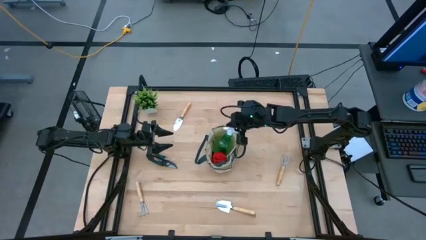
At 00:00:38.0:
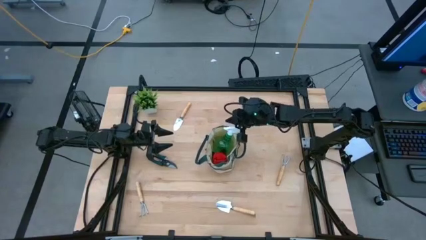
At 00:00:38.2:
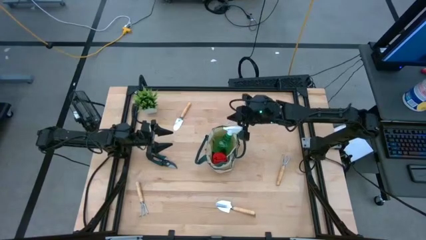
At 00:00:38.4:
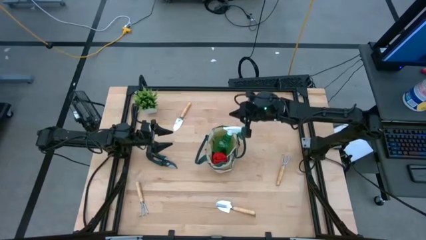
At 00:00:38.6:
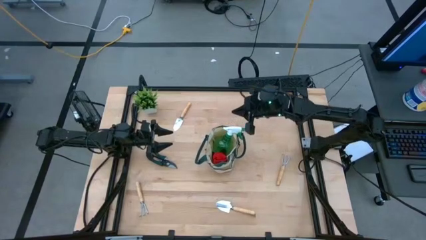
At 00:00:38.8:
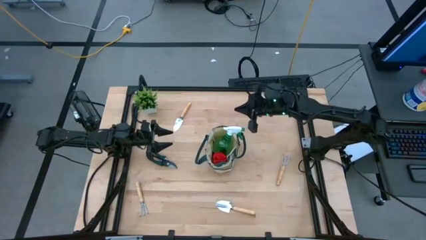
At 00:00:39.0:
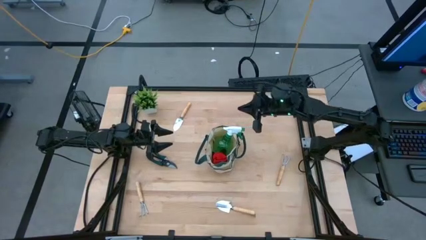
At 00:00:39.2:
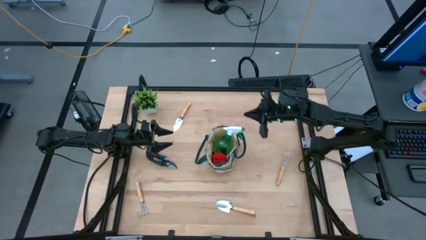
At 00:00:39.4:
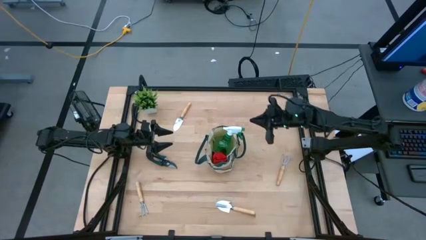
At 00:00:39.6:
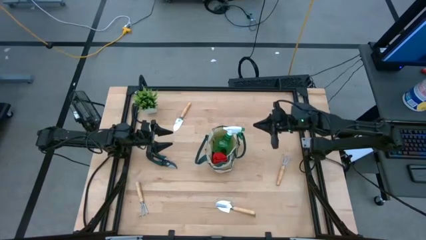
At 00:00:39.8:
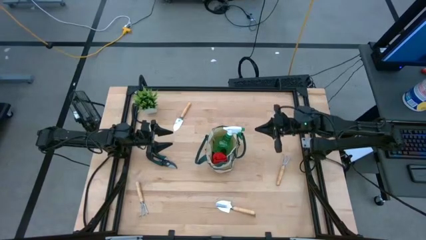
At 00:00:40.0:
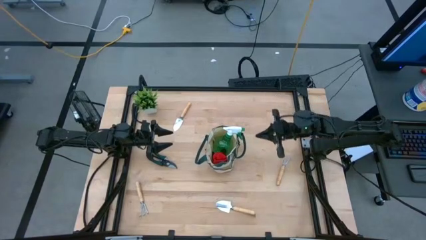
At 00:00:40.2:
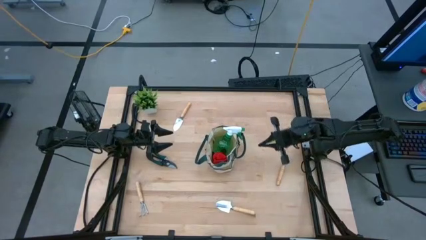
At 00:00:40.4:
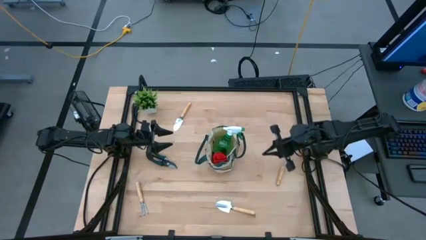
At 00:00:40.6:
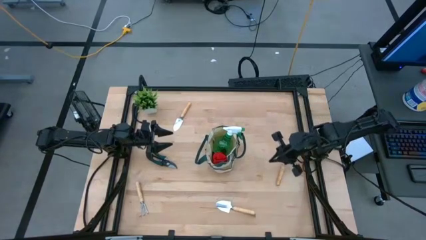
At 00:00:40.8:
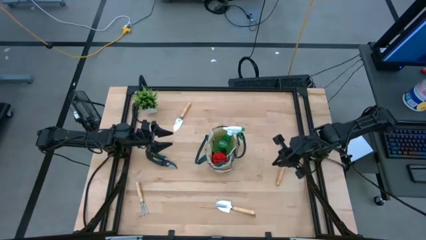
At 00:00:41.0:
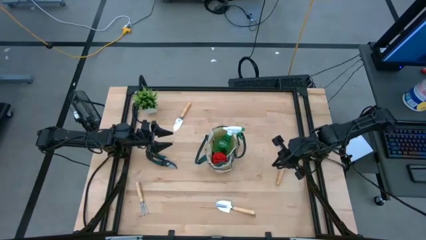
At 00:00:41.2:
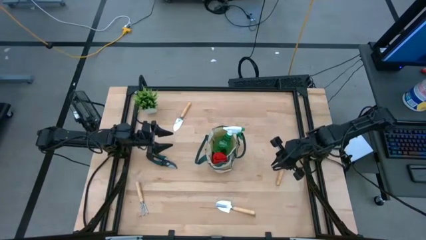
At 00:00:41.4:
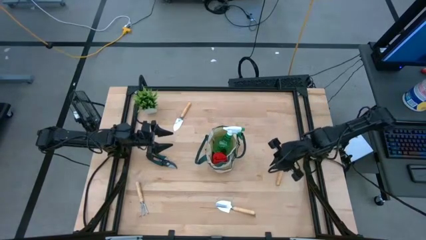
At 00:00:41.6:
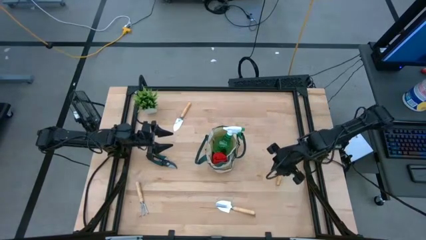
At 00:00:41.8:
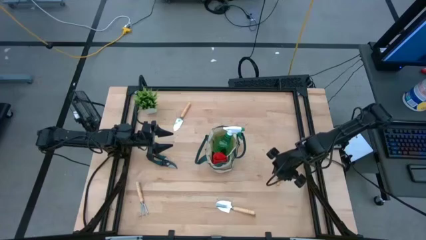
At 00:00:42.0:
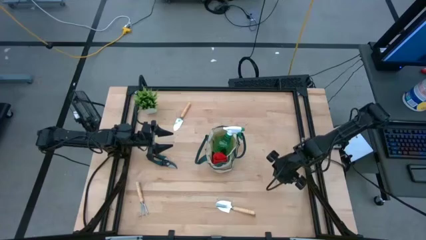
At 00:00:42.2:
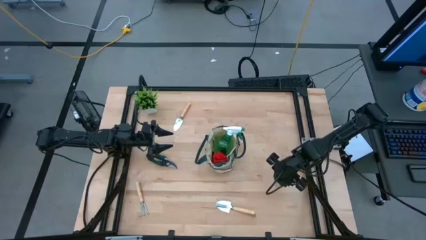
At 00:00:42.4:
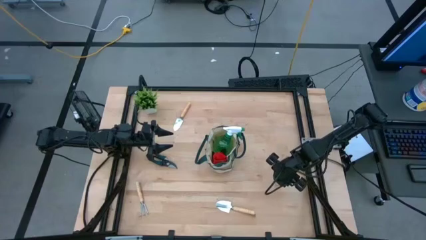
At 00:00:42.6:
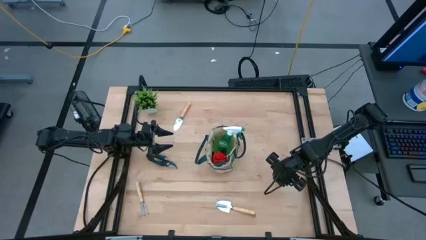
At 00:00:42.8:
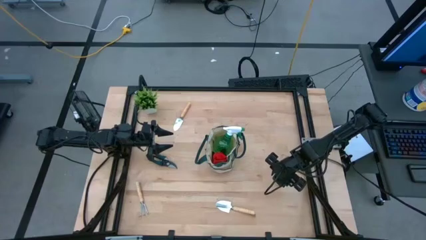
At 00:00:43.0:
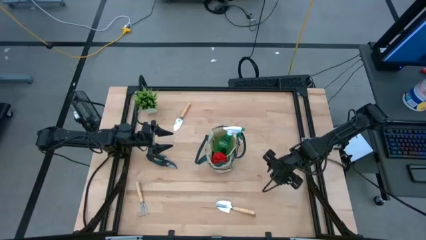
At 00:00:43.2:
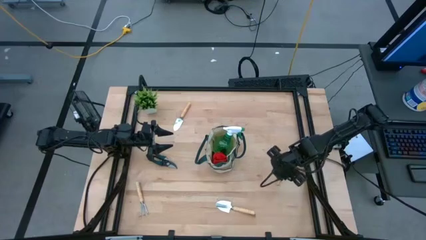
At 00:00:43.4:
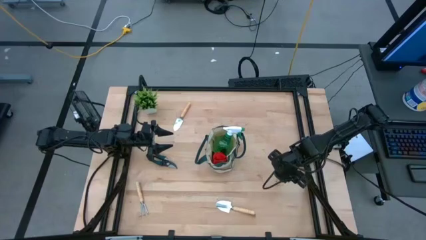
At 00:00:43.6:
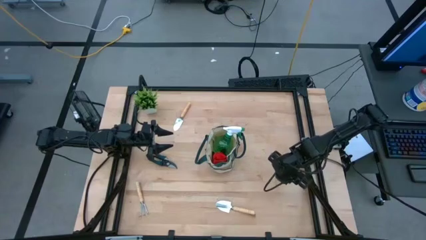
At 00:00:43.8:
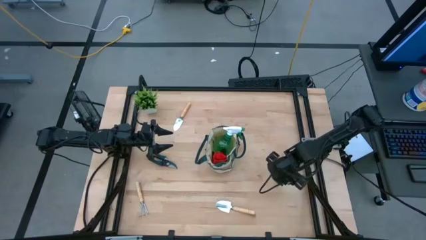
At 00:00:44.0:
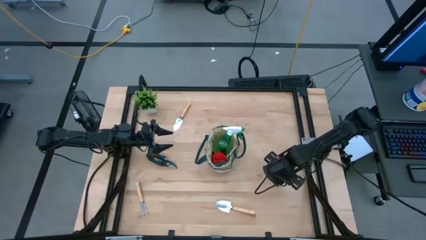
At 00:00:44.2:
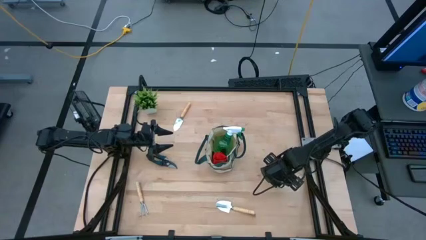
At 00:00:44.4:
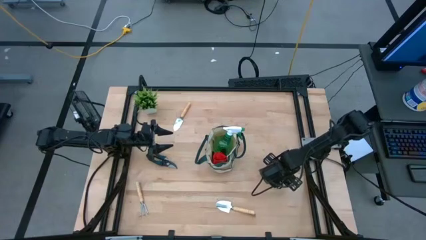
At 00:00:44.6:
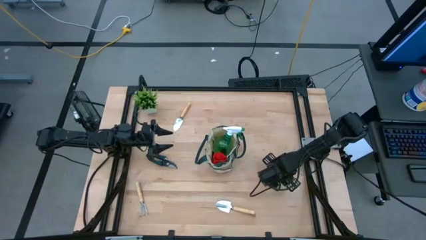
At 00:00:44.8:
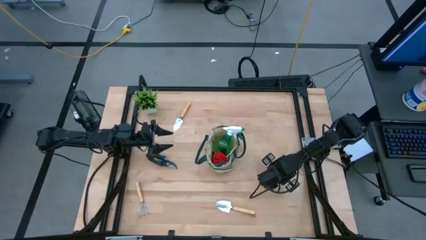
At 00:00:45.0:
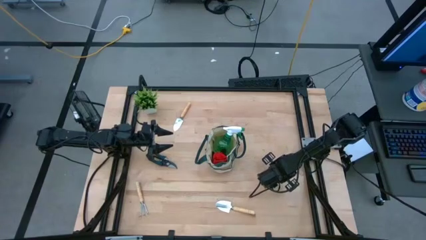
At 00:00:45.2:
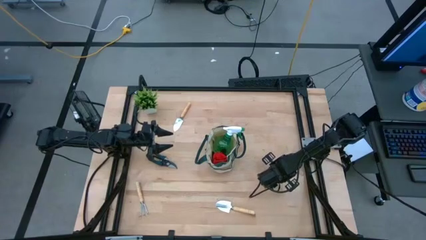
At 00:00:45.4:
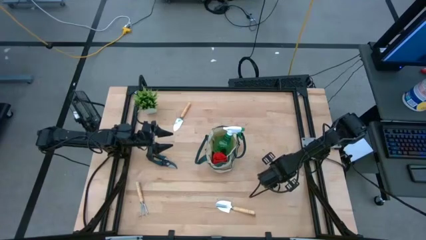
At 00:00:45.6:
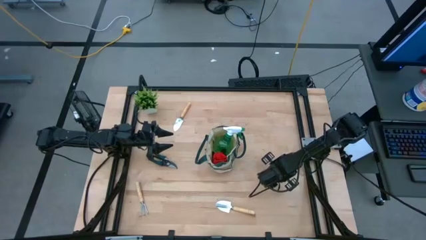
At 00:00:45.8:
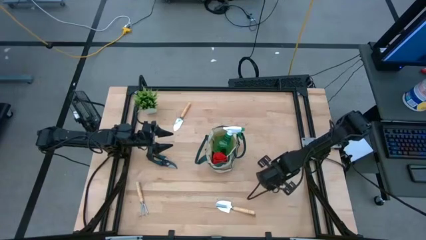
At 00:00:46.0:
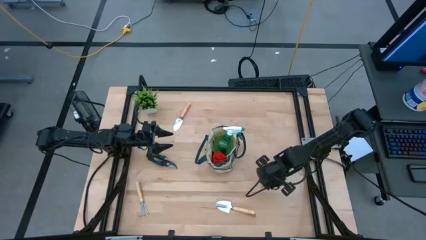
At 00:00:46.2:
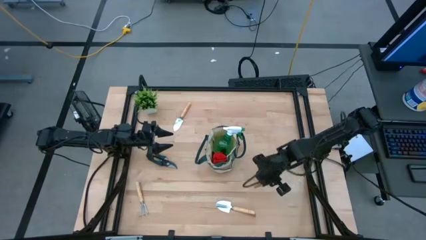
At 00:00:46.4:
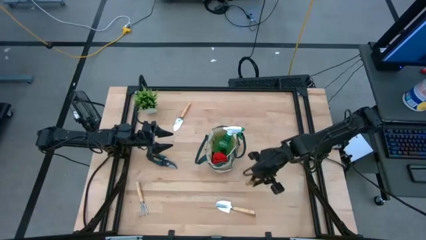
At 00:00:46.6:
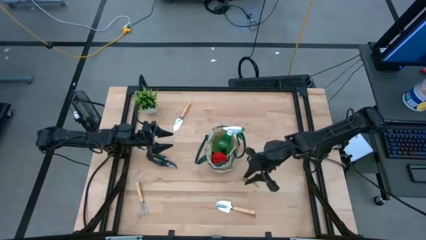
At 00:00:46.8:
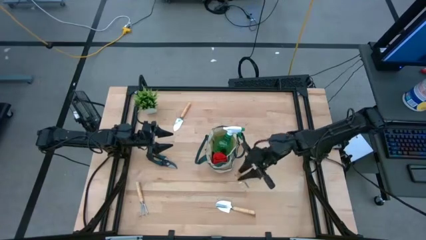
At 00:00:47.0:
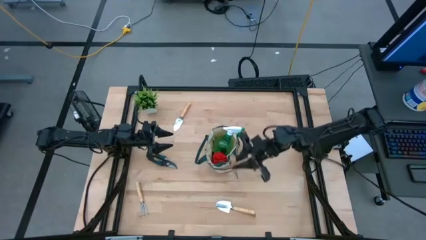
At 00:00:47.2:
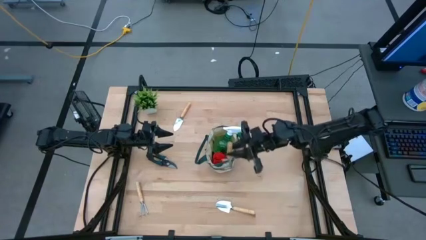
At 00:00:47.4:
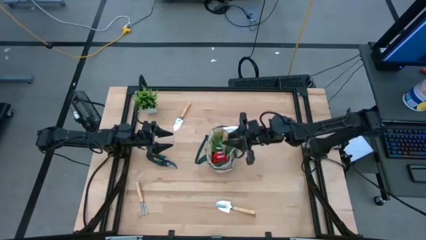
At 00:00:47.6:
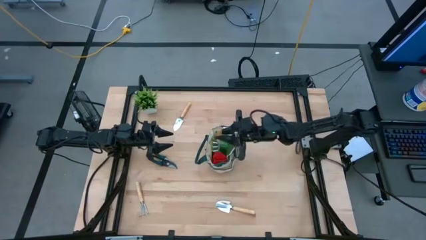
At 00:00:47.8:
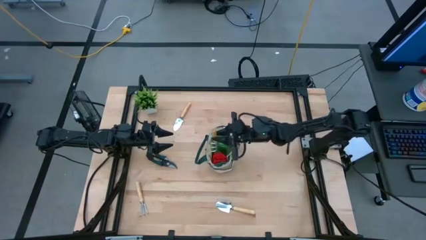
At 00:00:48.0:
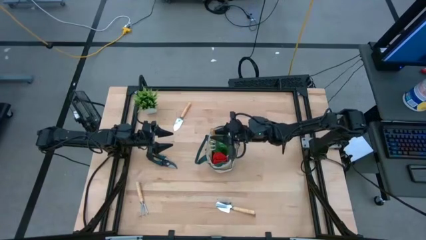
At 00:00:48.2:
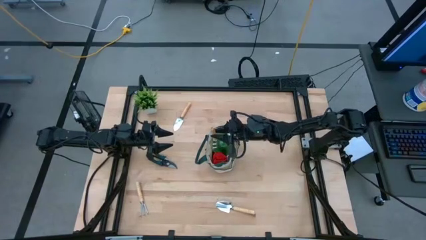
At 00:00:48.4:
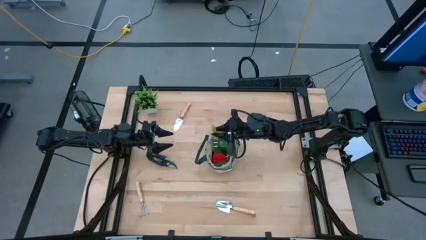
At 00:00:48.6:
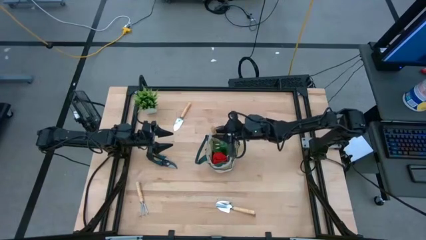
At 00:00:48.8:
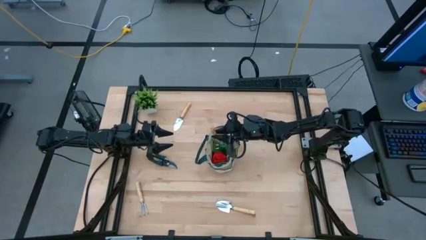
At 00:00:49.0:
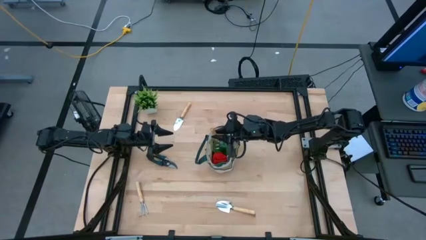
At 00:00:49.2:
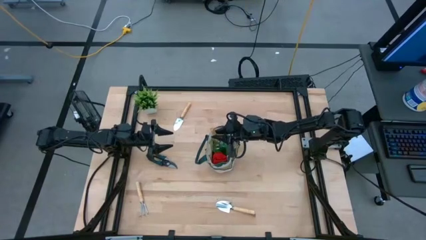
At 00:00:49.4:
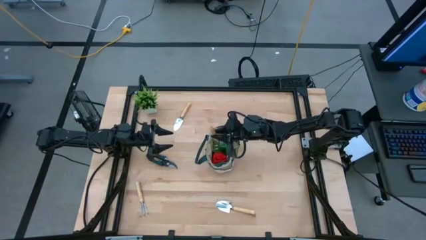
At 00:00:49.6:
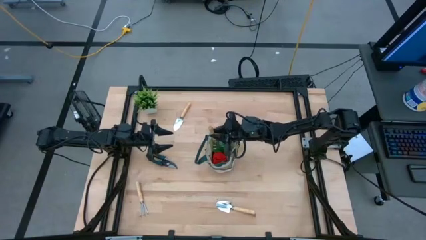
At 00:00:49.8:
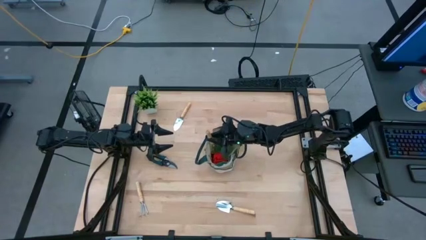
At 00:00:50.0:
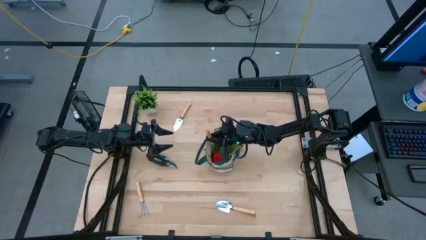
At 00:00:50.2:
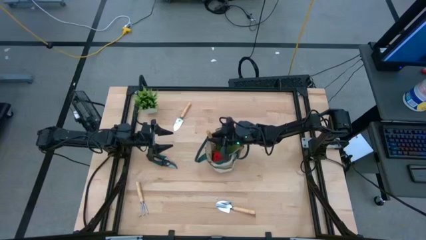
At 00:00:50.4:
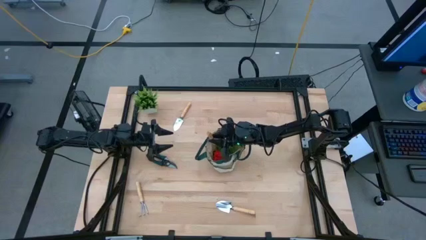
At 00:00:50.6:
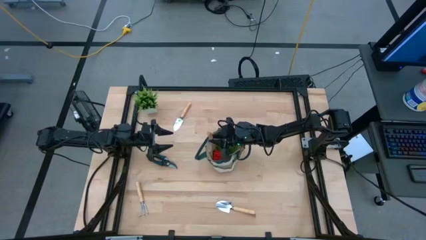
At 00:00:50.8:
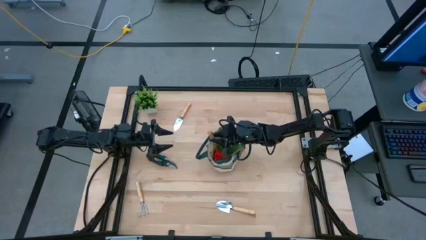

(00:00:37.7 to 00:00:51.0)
Task: Pick & Place Garden tools in Gardening bag
Put the right light brown hand rake into the light brown gardening bag
